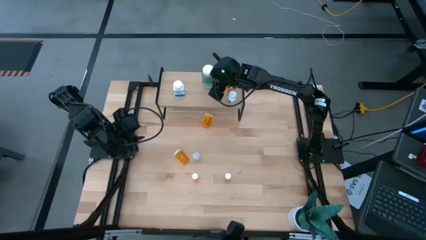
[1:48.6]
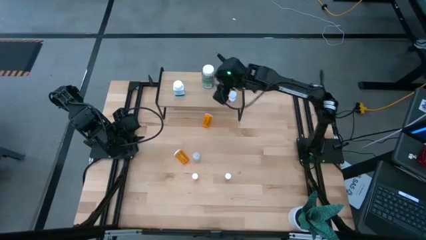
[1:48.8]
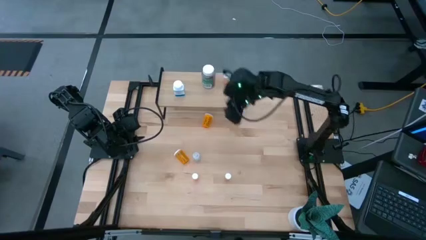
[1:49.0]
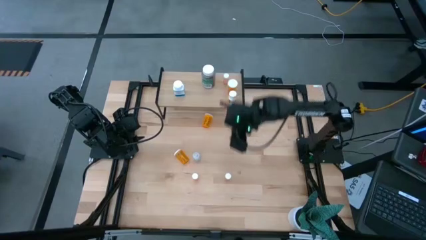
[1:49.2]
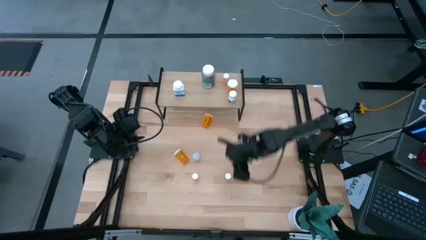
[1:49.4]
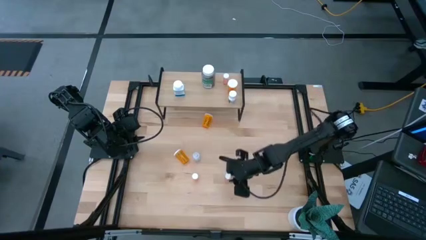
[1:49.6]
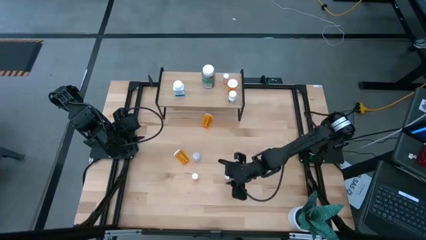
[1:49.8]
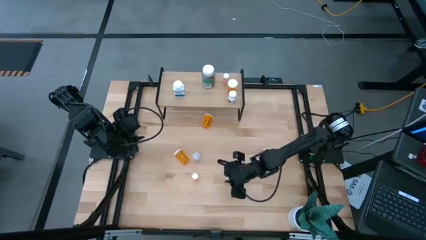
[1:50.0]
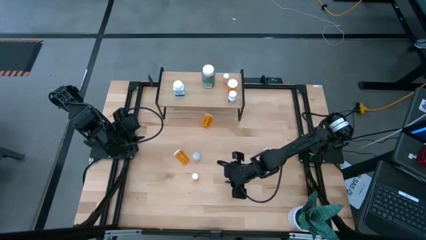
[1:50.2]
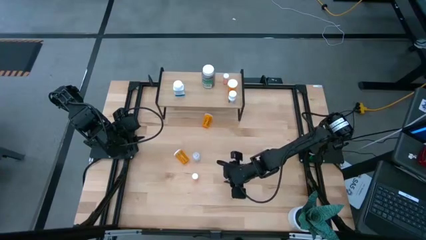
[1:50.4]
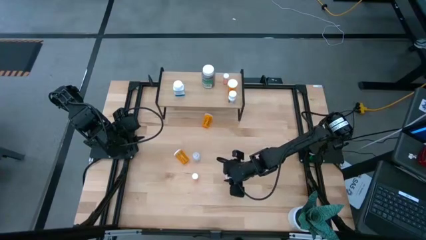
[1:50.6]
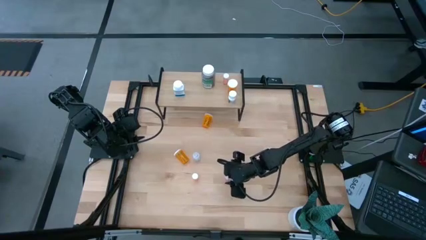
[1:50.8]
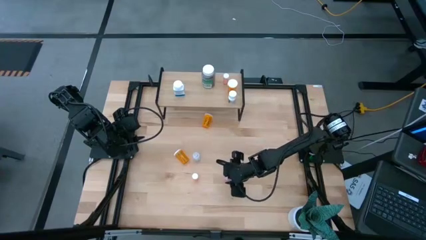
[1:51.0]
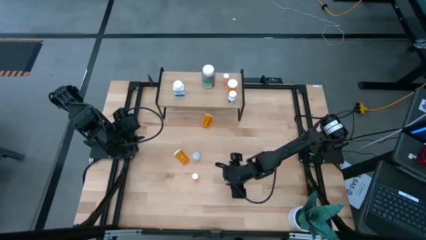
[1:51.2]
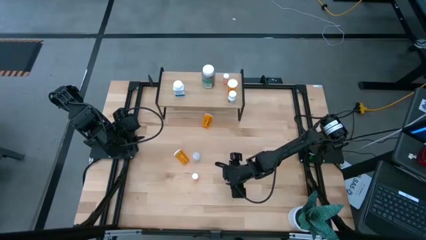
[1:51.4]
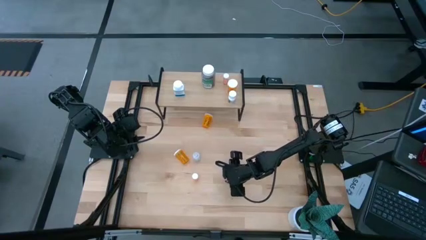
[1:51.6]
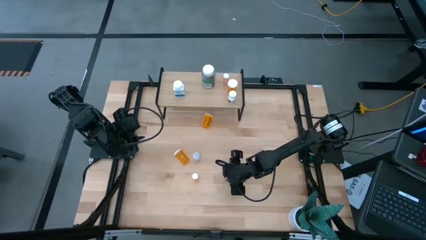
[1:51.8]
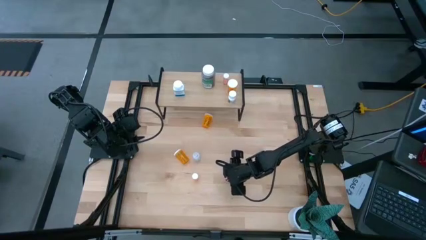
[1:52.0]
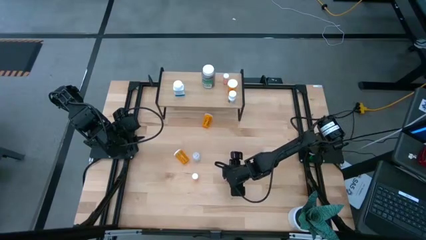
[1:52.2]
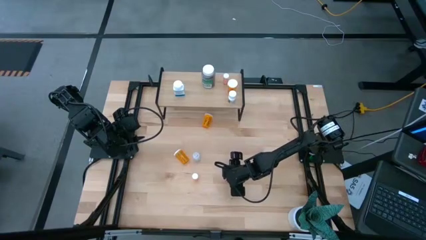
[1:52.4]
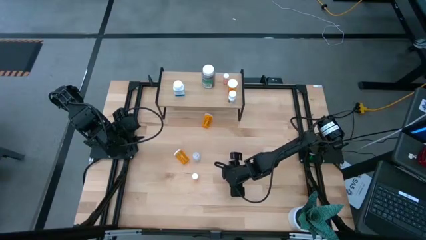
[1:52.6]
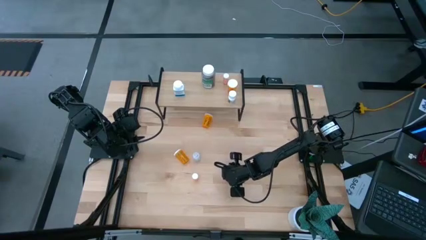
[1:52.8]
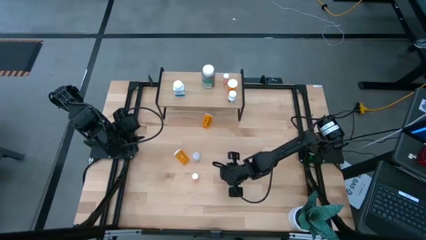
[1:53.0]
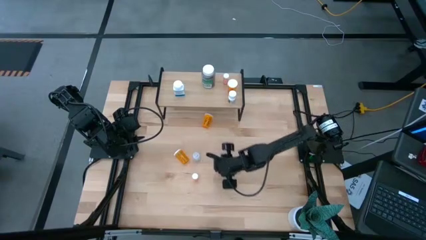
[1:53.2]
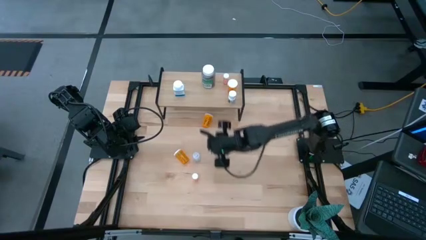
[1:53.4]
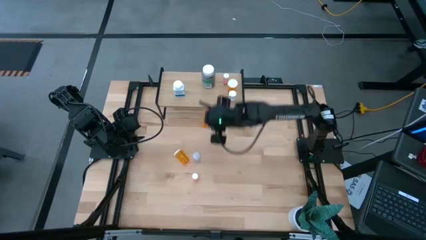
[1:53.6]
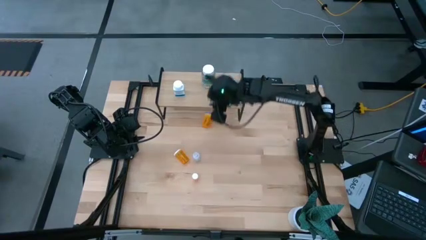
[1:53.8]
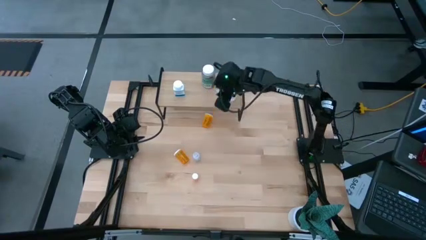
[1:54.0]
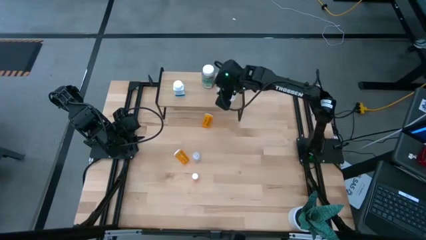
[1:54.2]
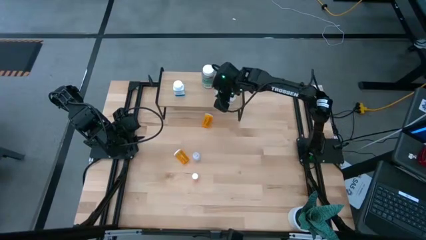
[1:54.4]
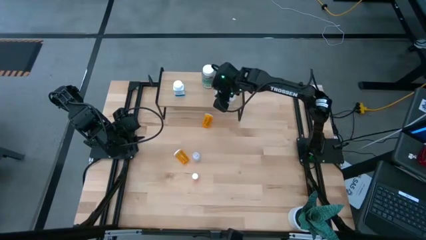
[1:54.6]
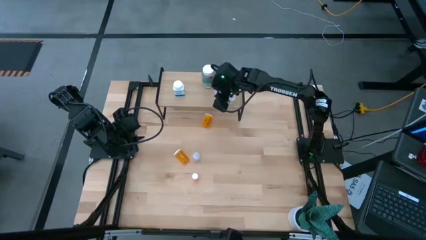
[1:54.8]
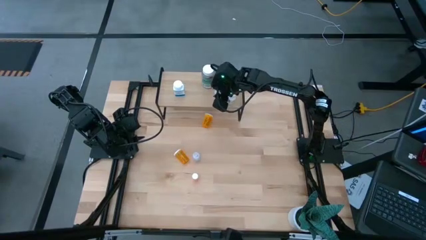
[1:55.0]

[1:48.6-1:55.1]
Task: Pick and place medicine bottles onto shelf by color
Put the right pink pill bottle on the shelf

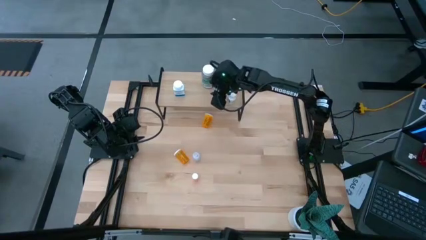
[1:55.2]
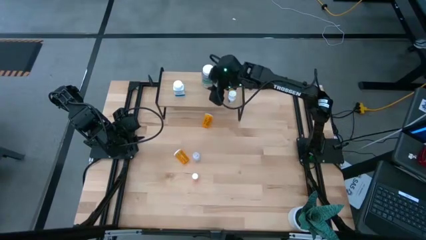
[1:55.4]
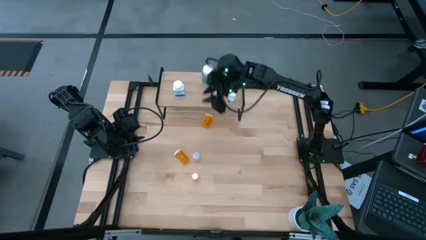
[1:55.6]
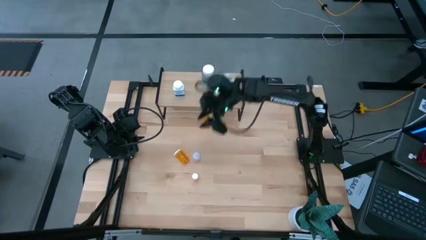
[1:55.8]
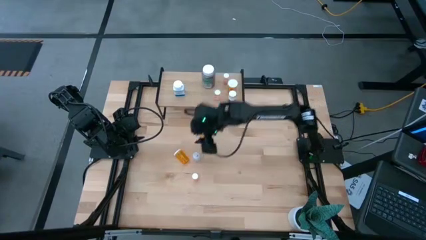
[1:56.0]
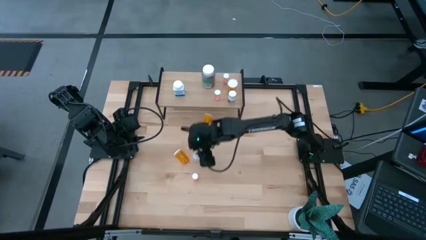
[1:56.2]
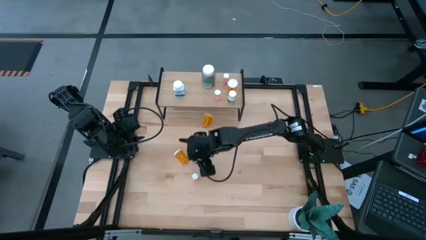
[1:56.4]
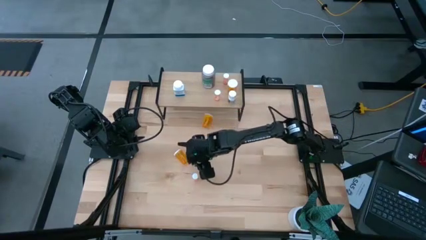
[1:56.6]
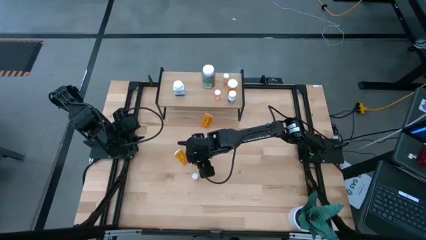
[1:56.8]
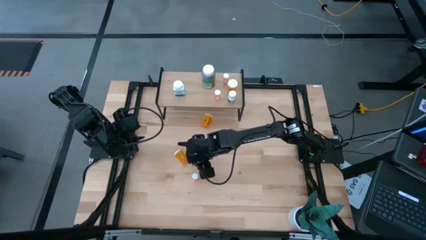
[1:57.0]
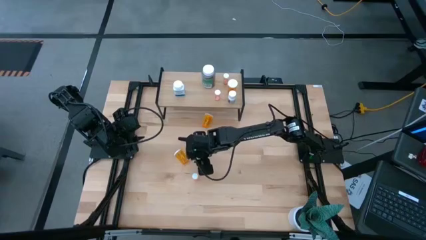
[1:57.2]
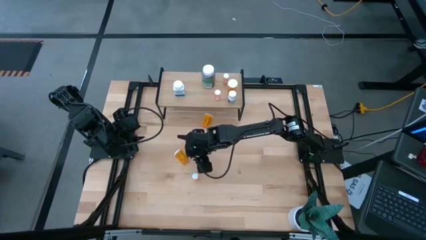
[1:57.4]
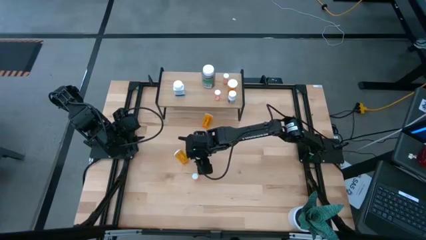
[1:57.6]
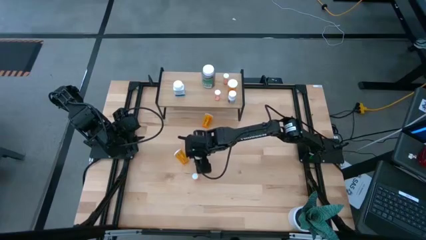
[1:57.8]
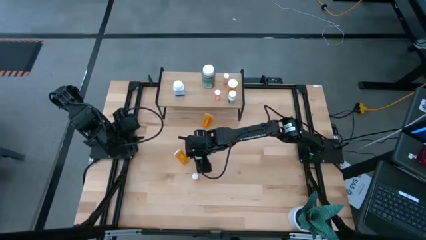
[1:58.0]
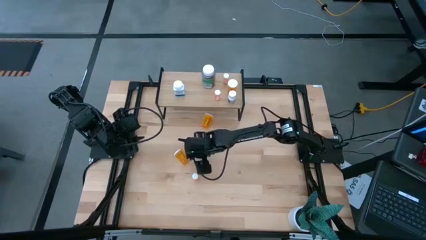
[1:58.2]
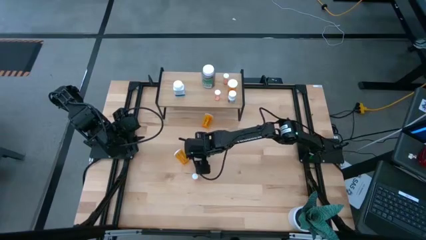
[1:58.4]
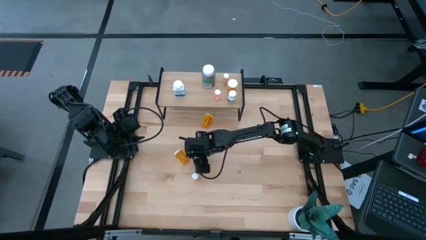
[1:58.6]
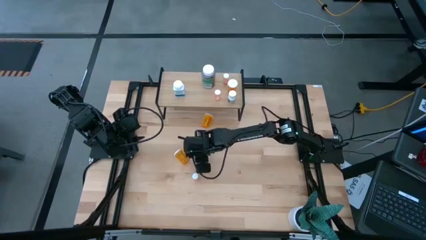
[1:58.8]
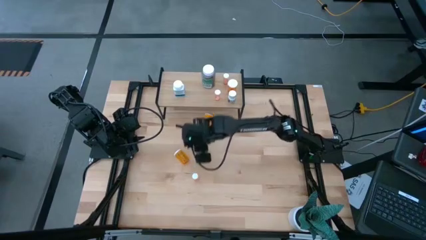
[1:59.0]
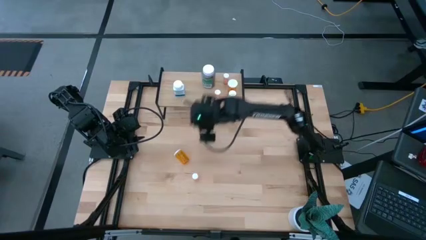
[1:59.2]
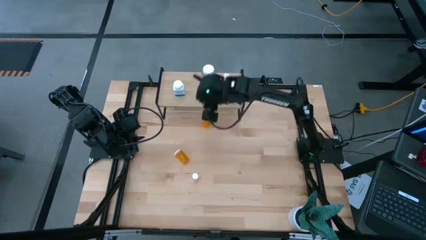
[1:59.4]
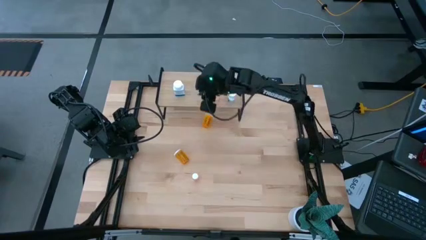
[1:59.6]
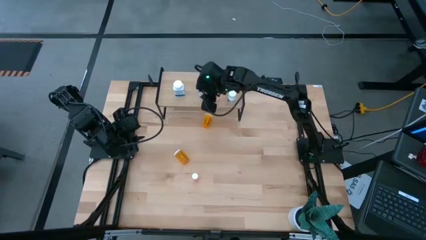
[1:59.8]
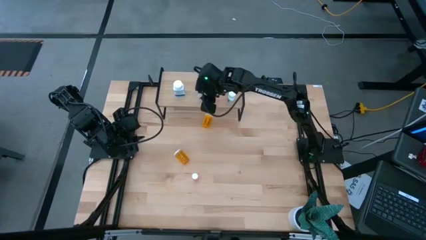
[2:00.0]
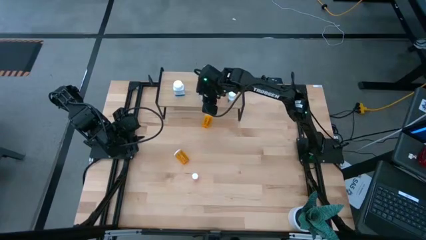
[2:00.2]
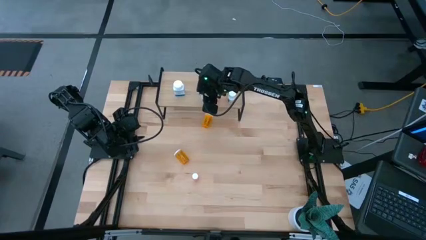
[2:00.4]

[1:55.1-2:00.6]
Put the transparent pill bottle on the shelf

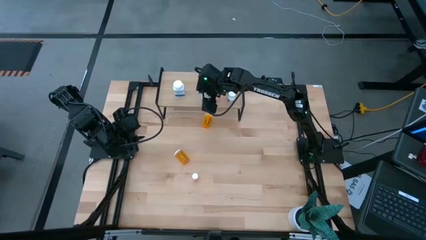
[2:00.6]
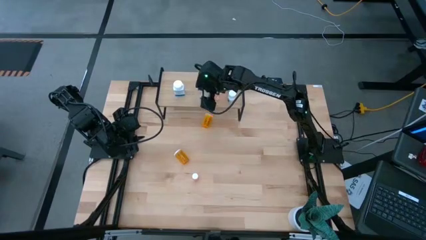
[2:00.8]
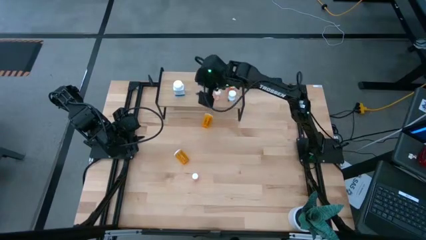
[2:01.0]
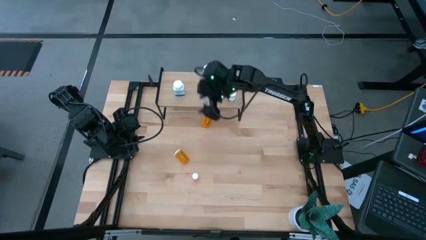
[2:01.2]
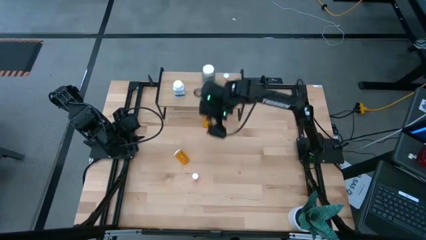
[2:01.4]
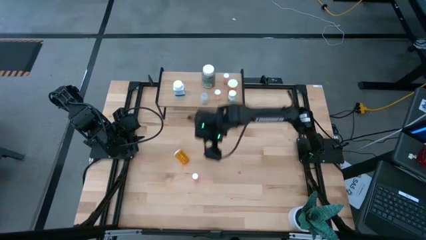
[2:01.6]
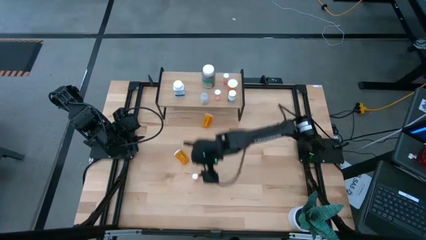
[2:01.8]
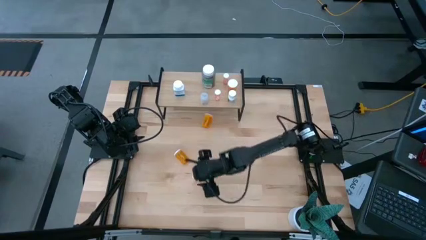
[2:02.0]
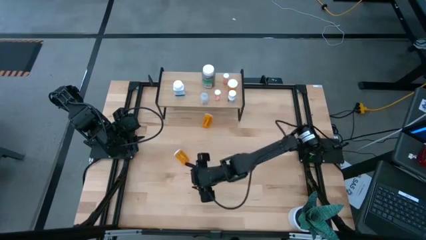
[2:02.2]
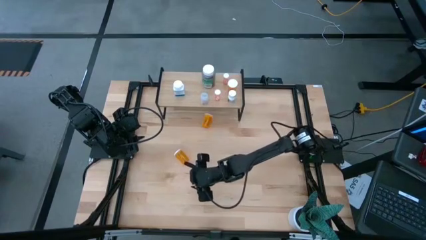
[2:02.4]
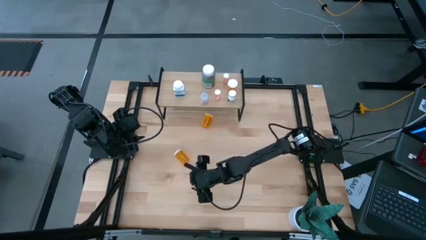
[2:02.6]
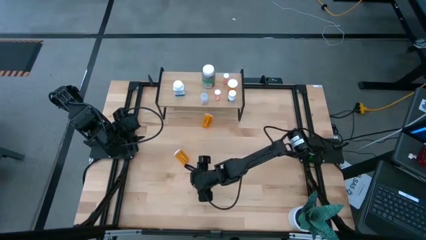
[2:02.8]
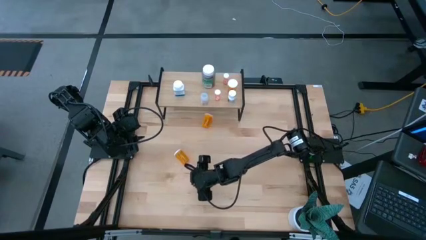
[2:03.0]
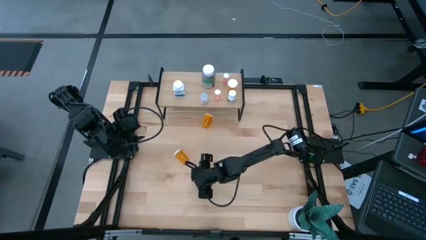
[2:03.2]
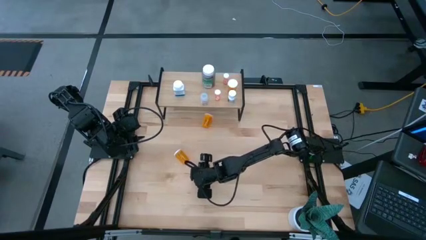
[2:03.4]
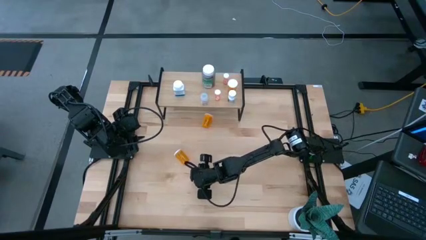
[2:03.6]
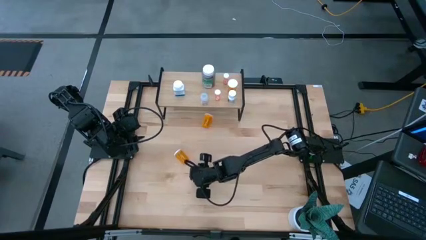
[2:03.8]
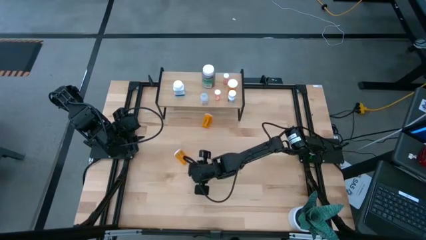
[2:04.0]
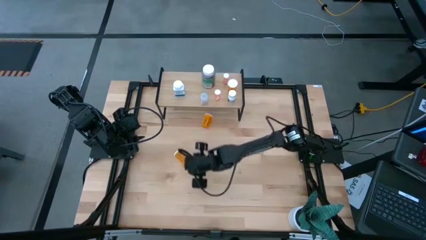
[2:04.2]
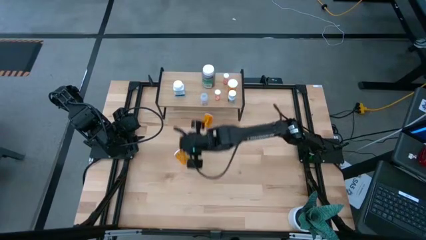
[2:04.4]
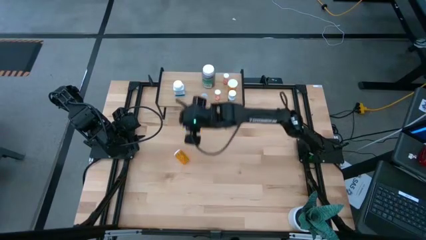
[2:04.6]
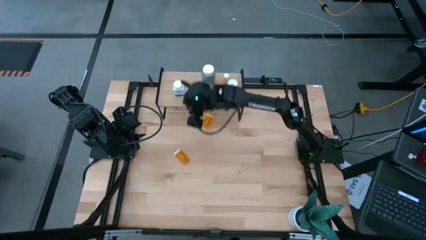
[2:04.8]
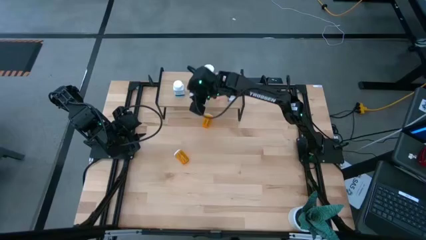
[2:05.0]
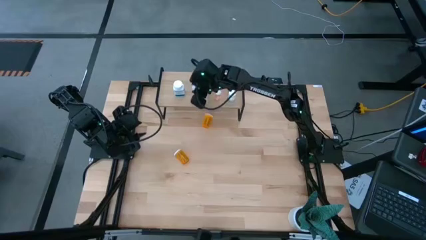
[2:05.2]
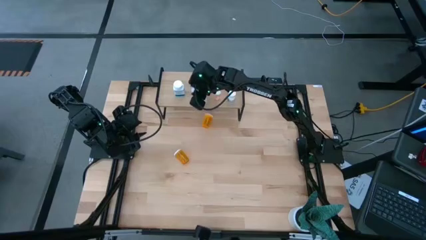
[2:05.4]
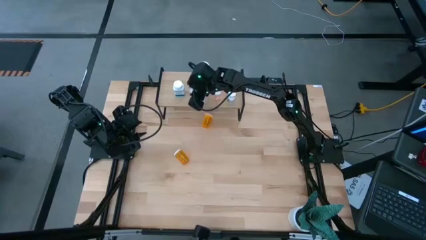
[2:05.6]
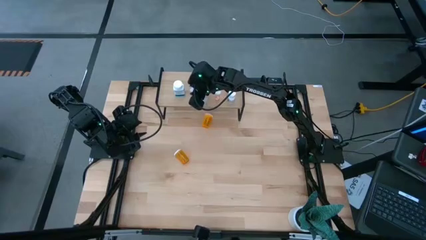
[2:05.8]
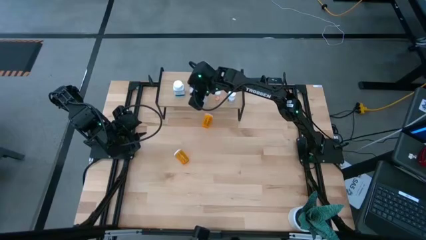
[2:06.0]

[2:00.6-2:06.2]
Put the pink bottle on the shelf
